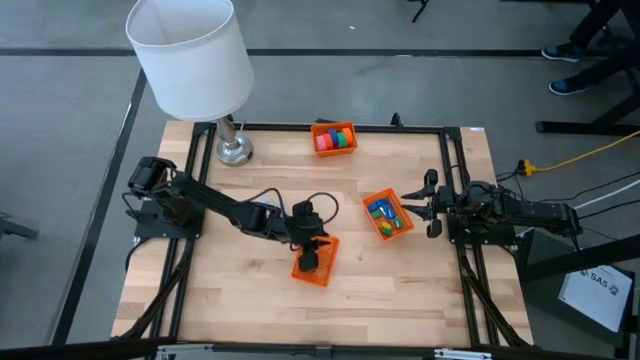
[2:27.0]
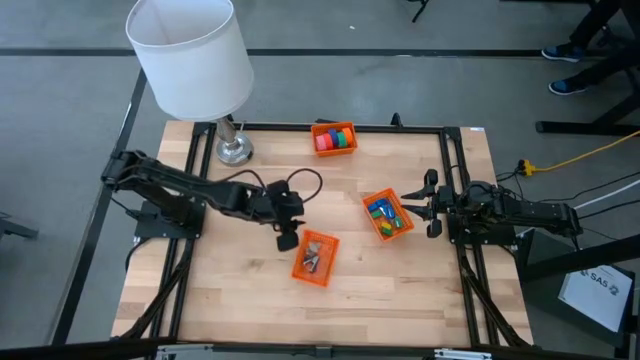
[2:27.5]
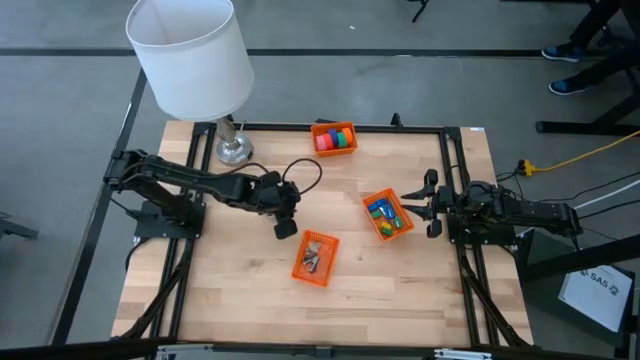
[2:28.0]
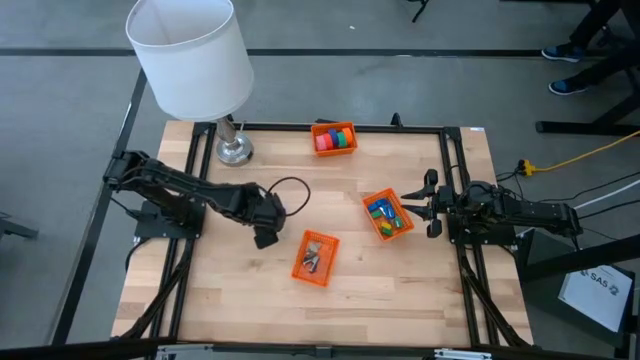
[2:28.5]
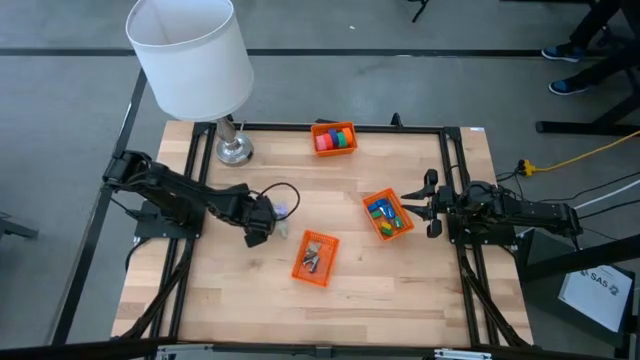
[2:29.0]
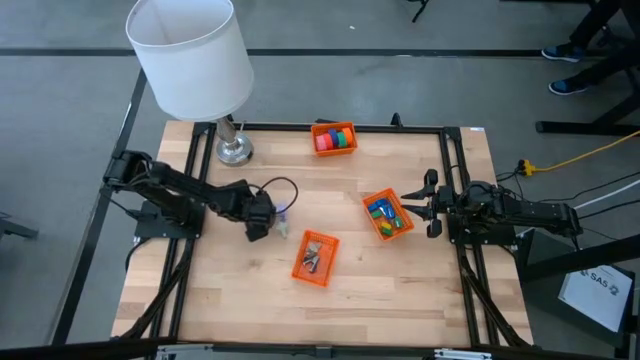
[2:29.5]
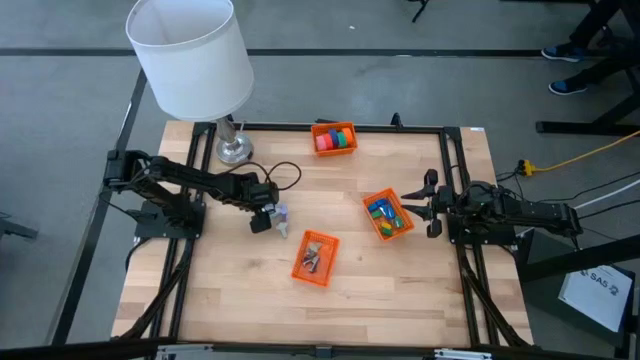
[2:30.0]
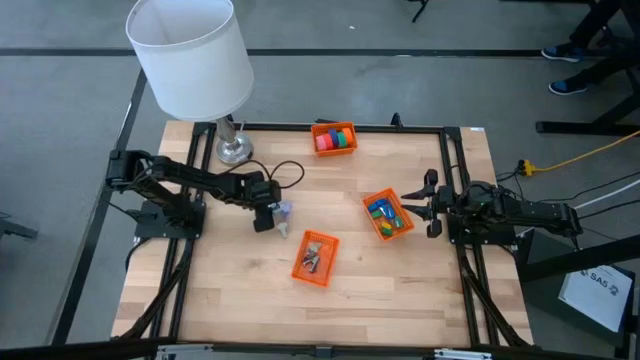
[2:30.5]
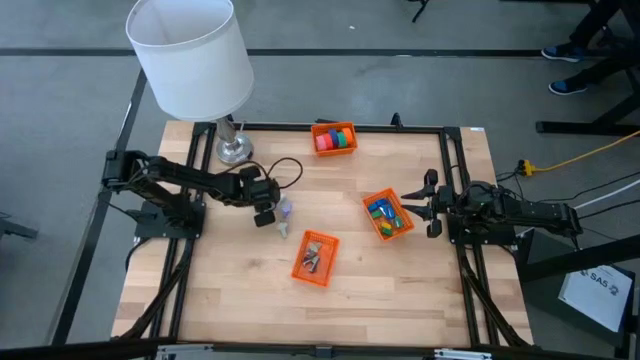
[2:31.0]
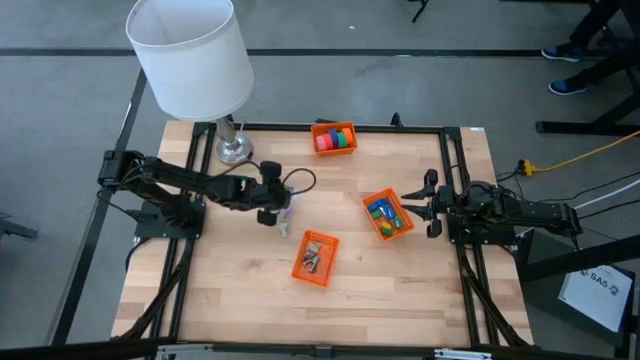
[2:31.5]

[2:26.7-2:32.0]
Task: Pick and place Stapler, Stapler remover, tape
Put the blue staple remover into the bottom orange bin

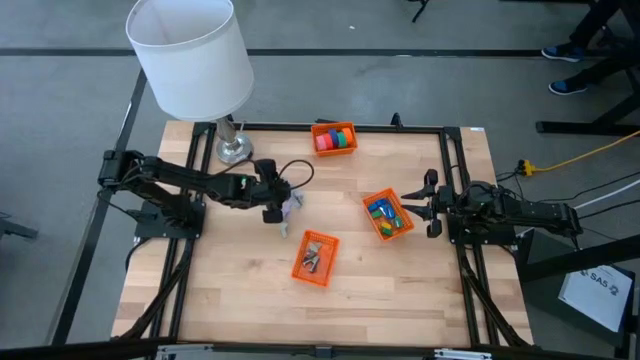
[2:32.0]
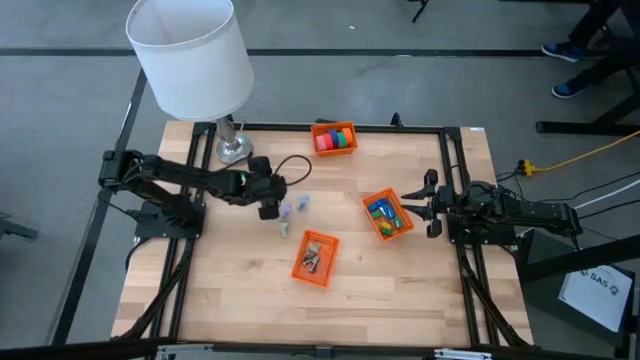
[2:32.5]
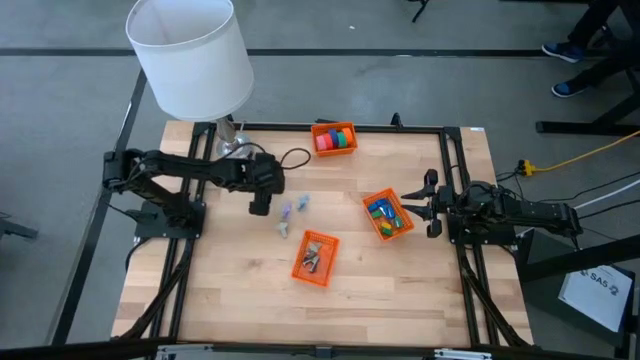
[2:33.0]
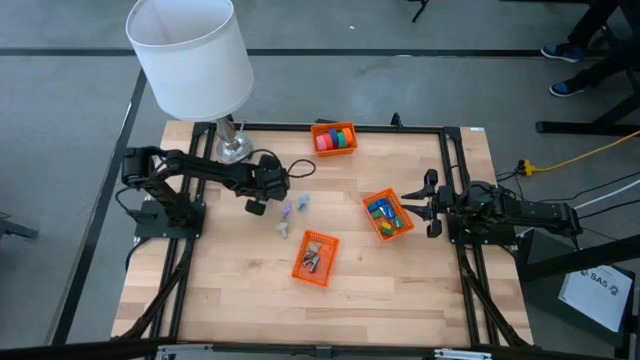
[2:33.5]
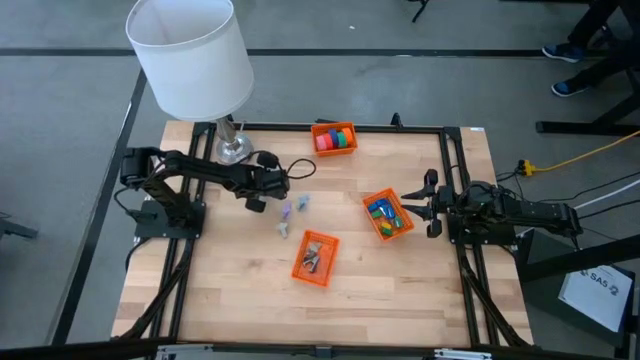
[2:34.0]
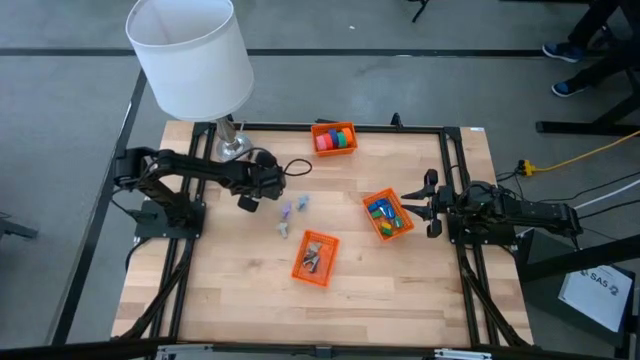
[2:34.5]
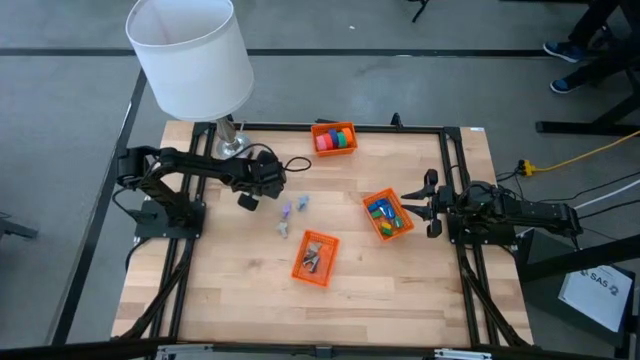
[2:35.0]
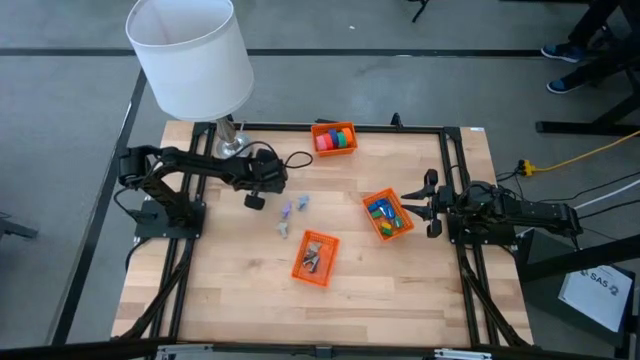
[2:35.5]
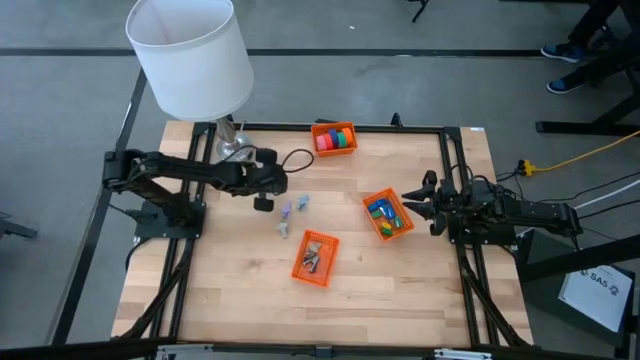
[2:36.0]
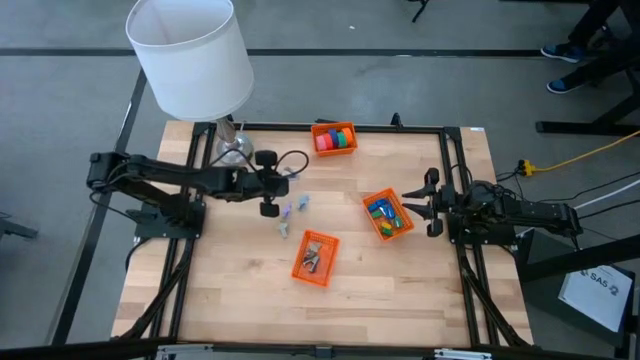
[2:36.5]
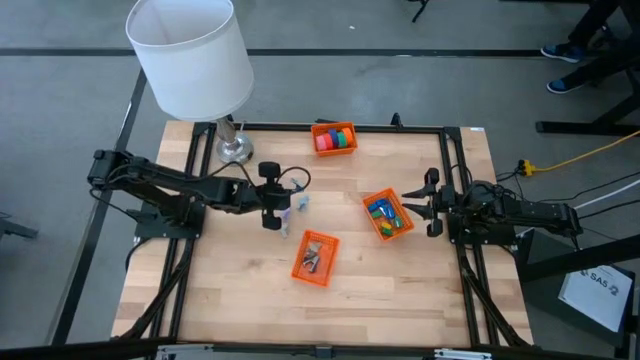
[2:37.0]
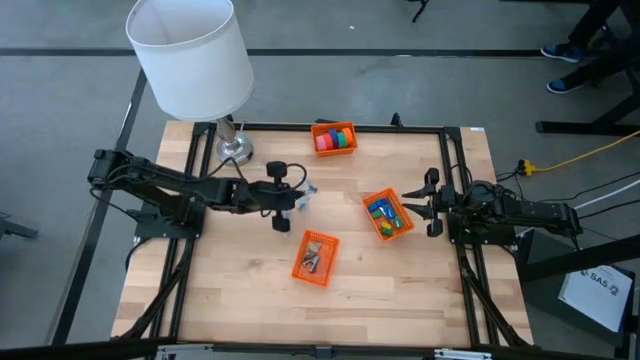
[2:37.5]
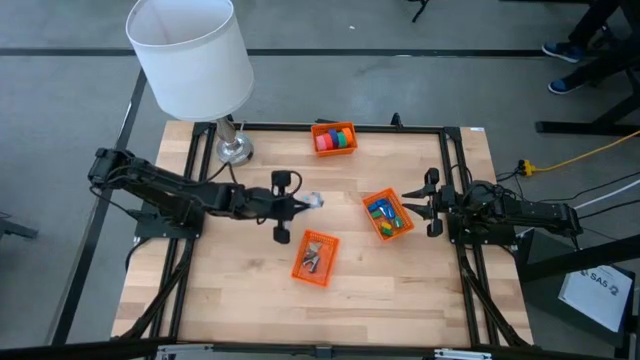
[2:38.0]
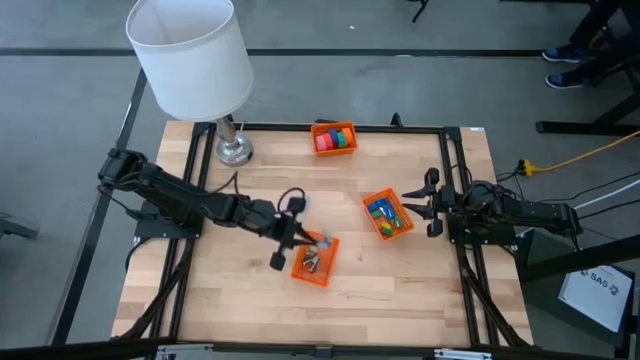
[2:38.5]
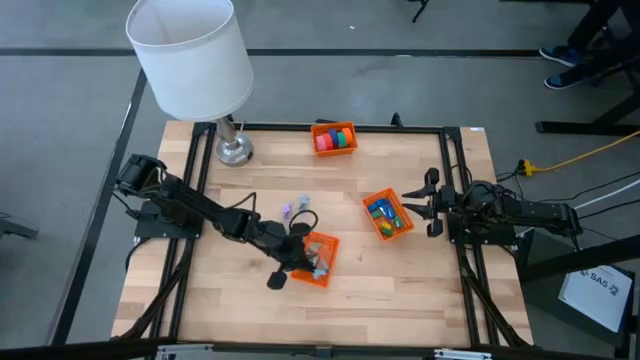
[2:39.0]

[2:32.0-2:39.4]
Put the blue staple remover into the bottom orange bin

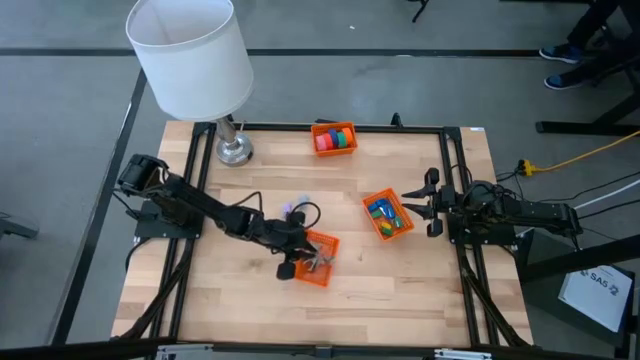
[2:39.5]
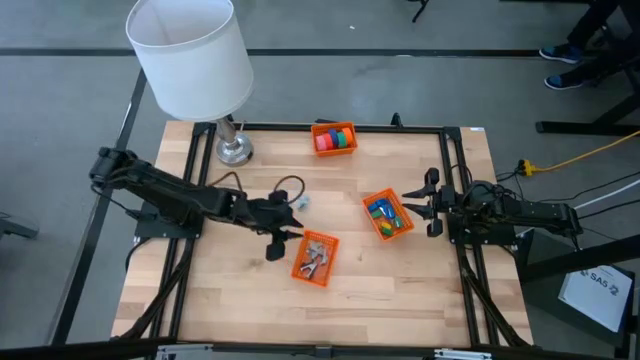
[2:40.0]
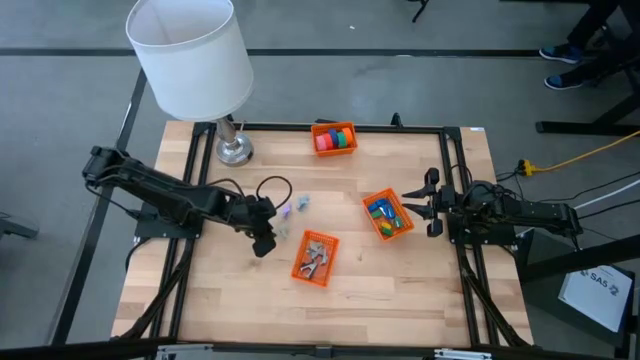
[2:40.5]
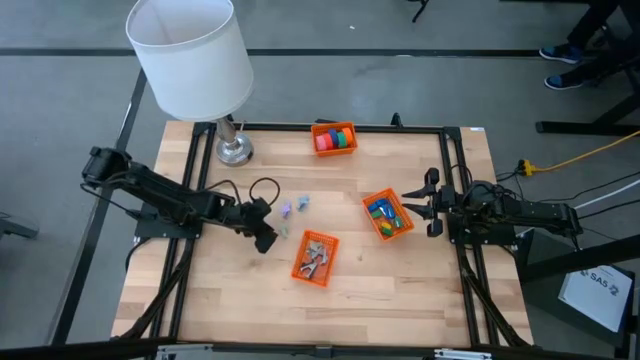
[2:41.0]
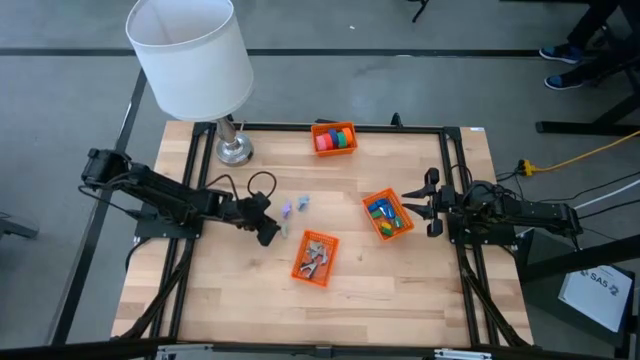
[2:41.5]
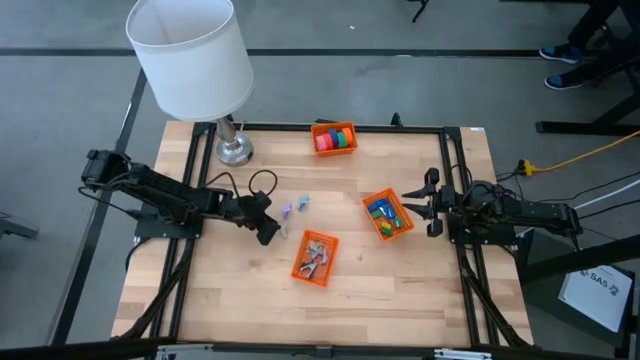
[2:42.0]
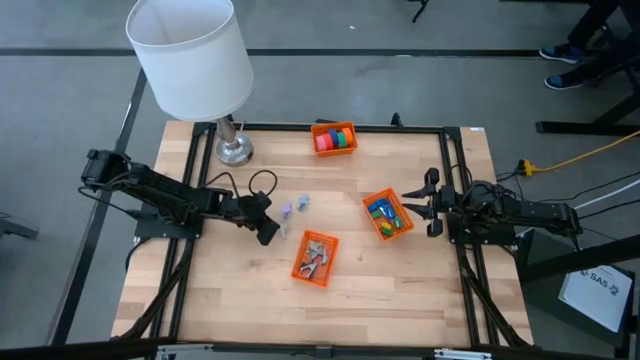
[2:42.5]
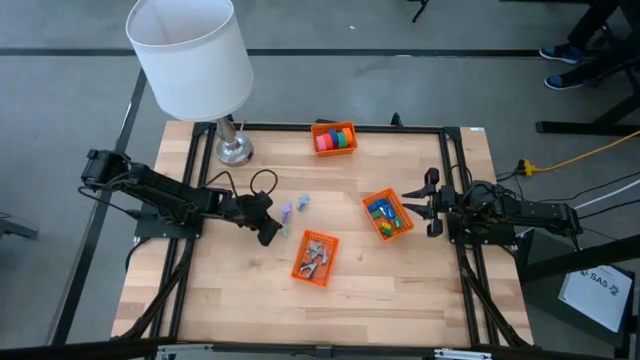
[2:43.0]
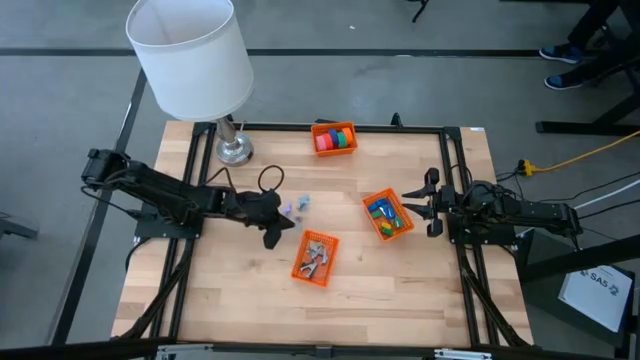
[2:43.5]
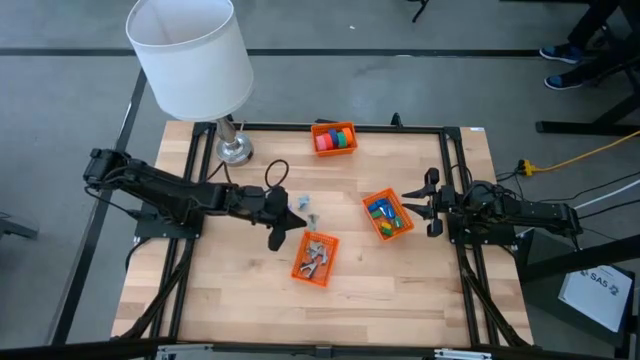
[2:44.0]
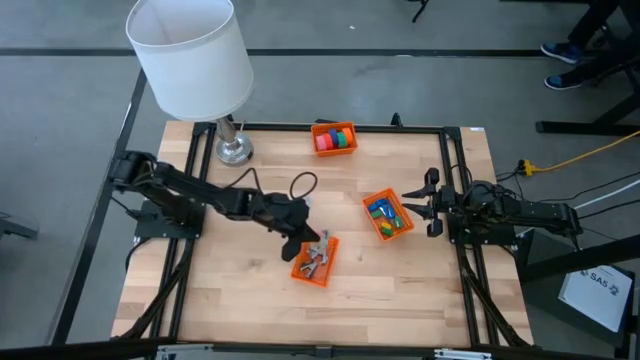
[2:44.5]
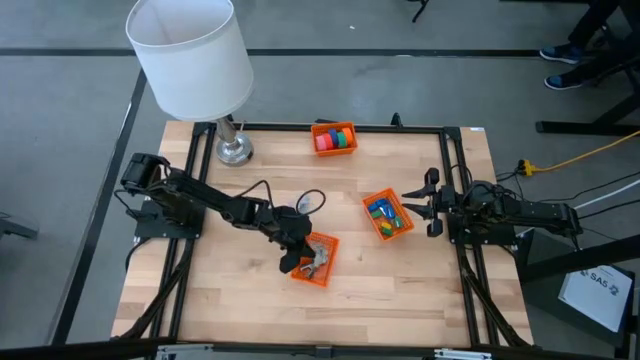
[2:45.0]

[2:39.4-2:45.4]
Put the gray staple remover into the bottom orange bin

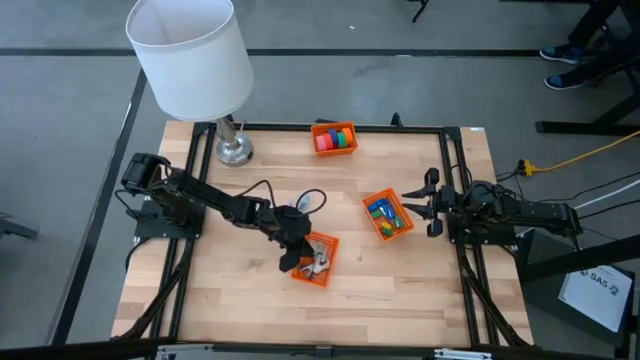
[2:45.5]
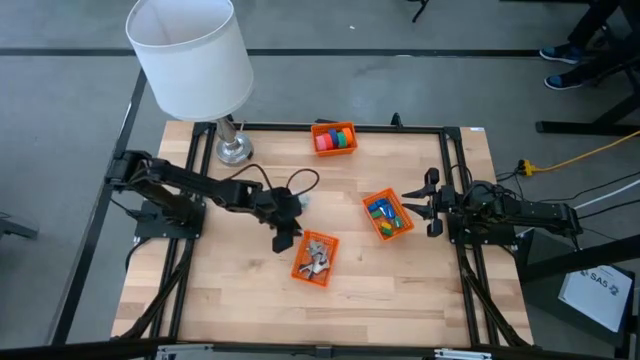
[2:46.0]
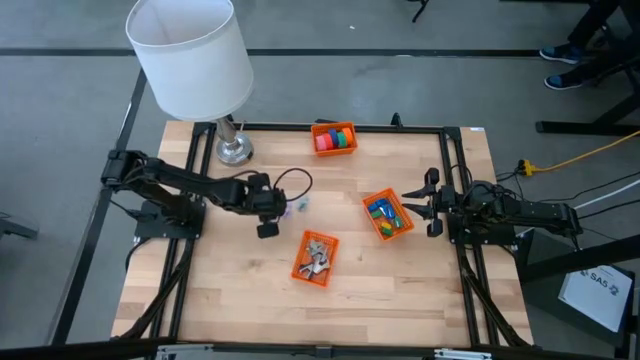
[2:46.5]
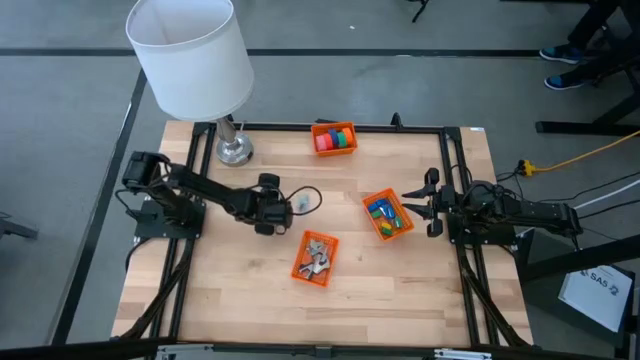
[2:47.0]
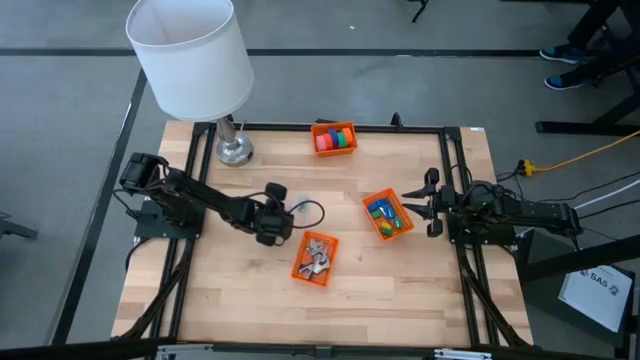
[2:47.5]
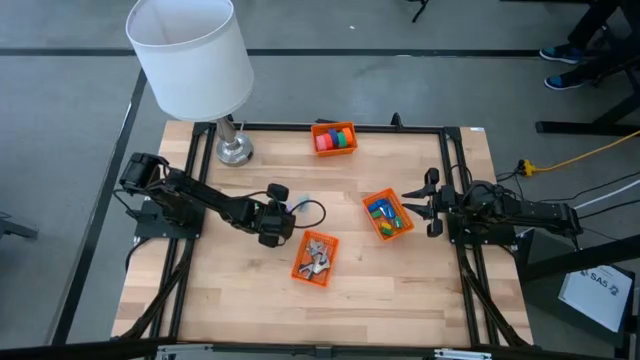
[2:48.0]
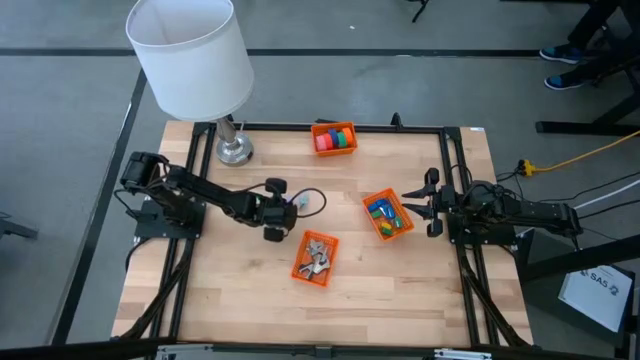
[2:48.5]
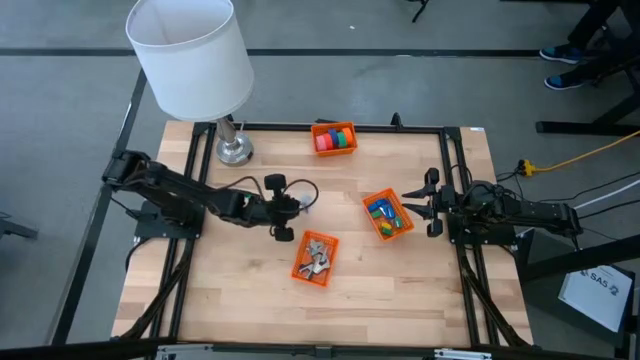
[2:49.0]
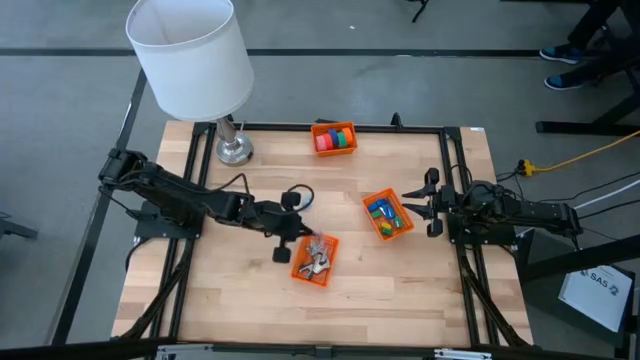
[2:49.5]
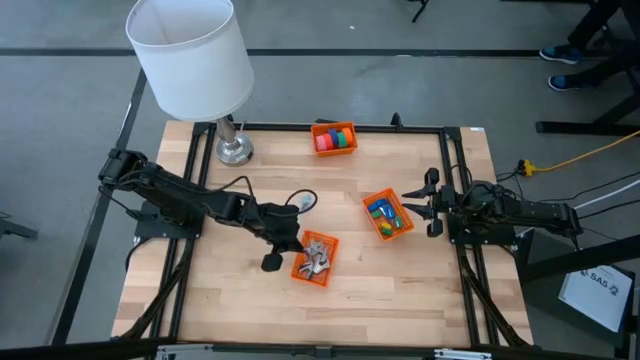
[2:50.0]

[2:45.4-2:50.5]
Put the violet staple remover into the bottom orange bin
